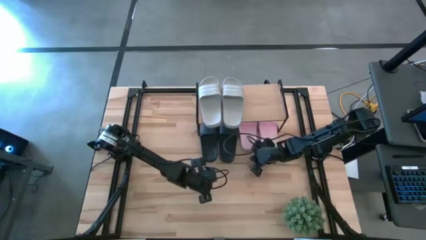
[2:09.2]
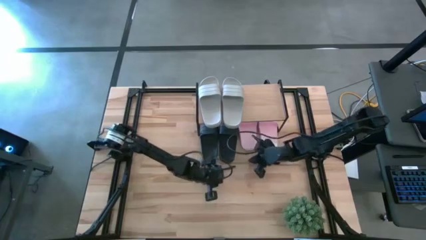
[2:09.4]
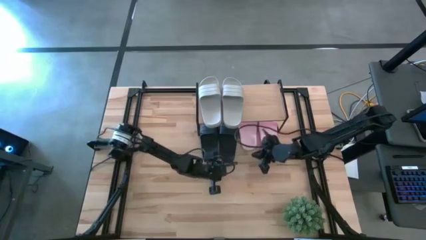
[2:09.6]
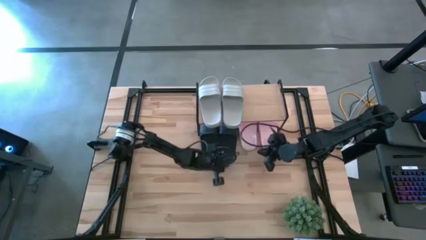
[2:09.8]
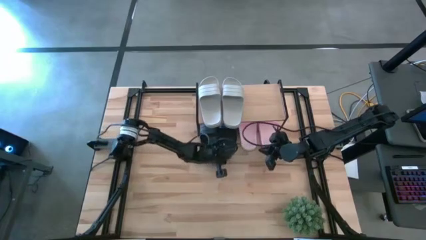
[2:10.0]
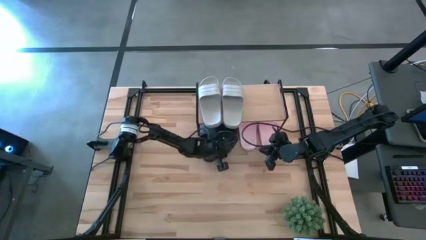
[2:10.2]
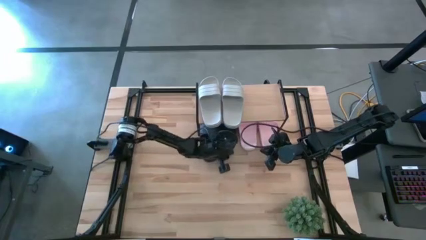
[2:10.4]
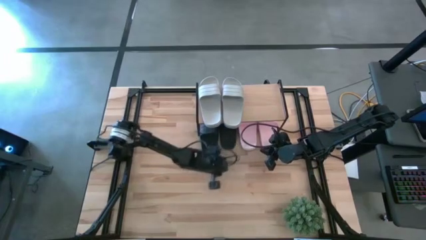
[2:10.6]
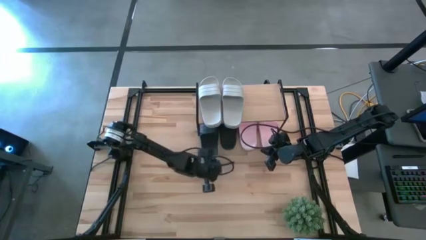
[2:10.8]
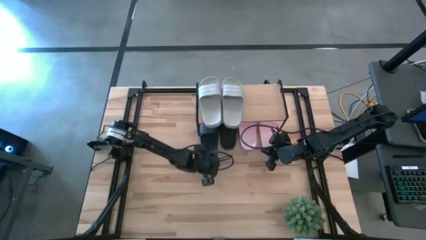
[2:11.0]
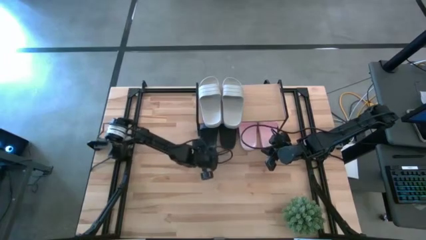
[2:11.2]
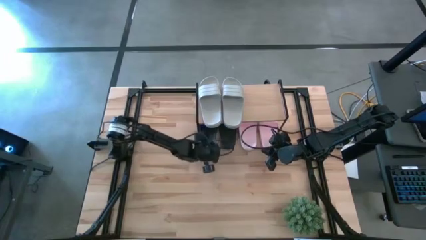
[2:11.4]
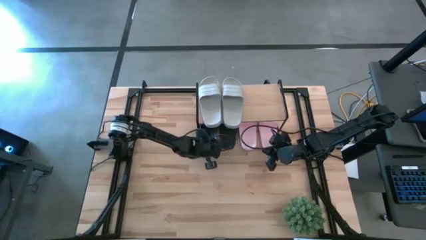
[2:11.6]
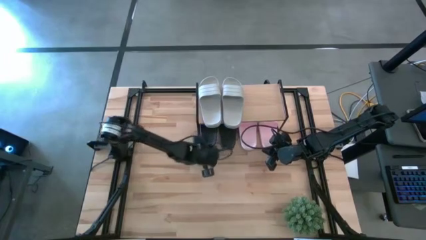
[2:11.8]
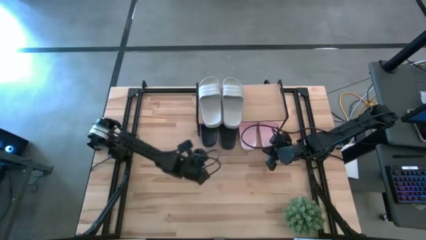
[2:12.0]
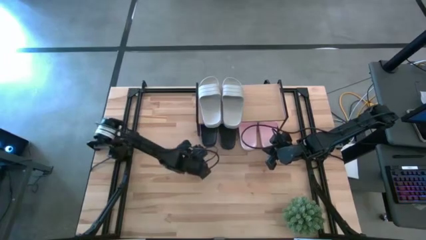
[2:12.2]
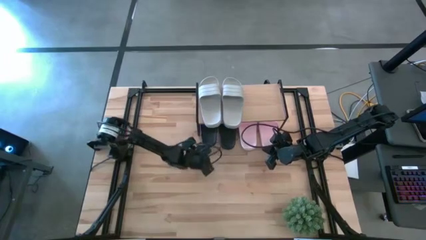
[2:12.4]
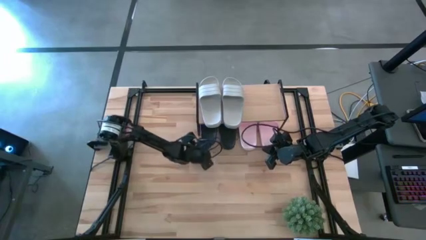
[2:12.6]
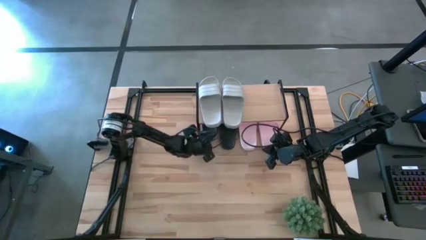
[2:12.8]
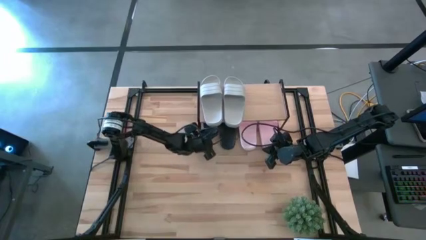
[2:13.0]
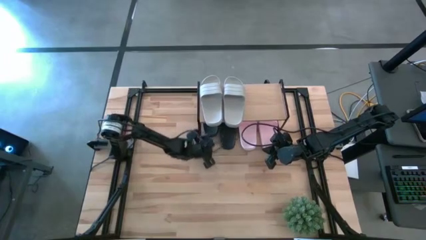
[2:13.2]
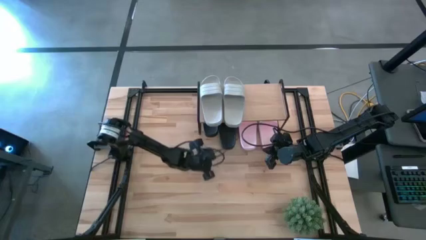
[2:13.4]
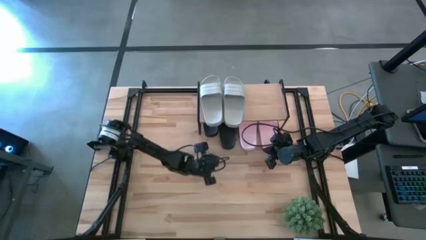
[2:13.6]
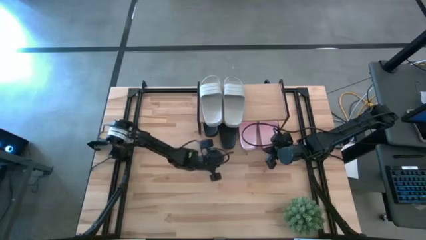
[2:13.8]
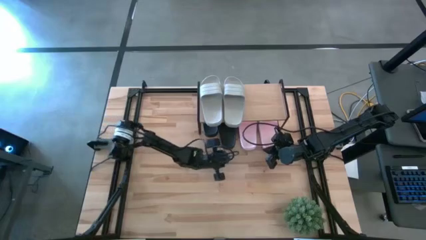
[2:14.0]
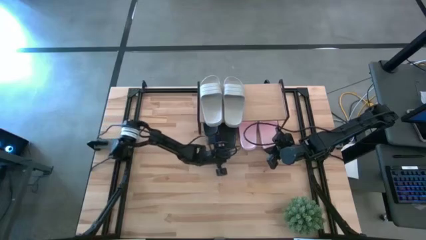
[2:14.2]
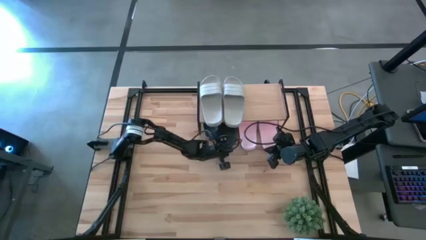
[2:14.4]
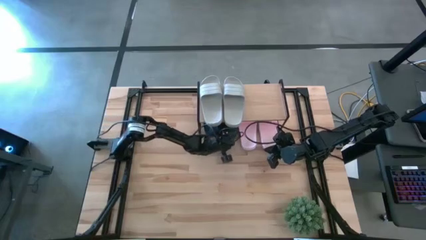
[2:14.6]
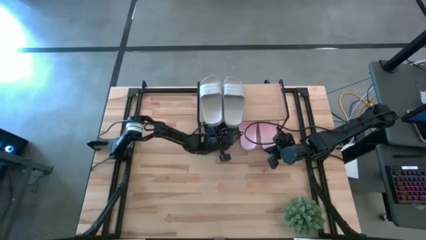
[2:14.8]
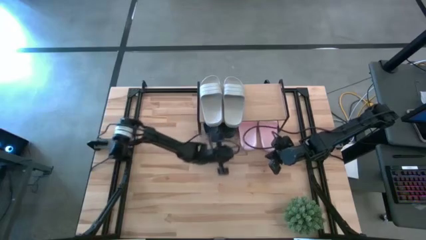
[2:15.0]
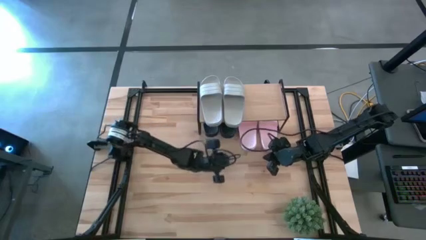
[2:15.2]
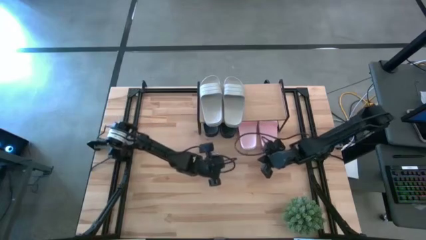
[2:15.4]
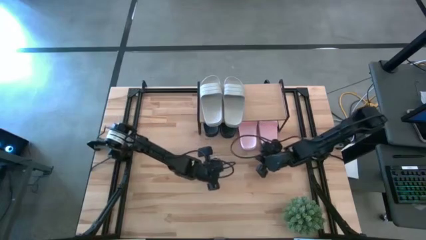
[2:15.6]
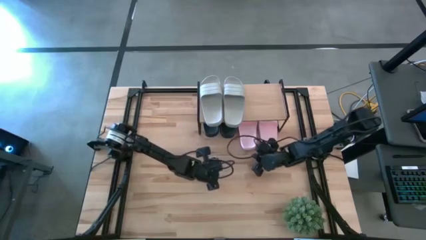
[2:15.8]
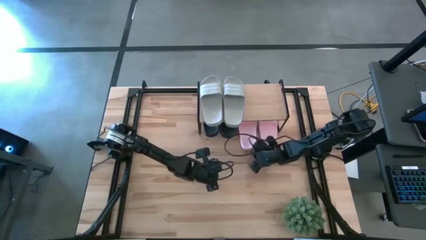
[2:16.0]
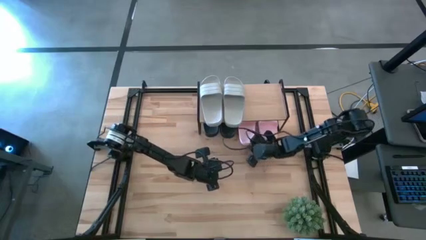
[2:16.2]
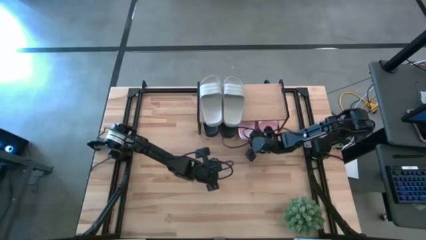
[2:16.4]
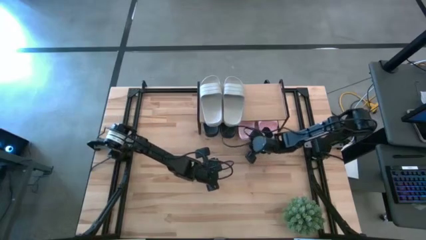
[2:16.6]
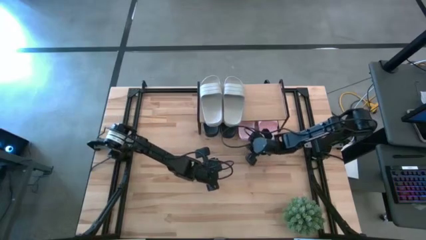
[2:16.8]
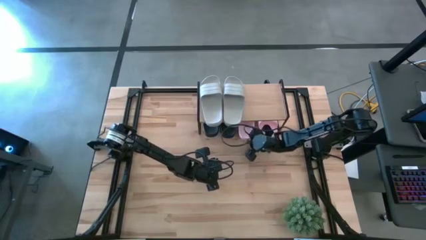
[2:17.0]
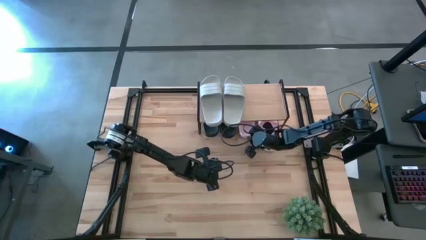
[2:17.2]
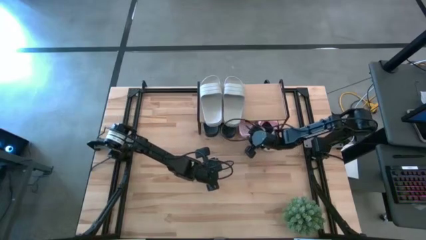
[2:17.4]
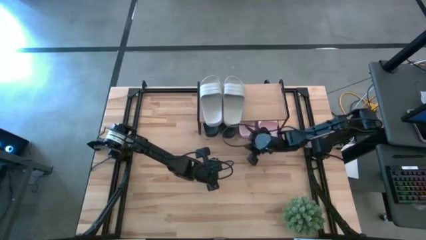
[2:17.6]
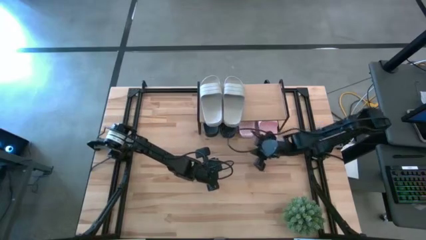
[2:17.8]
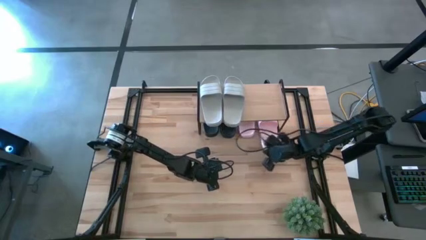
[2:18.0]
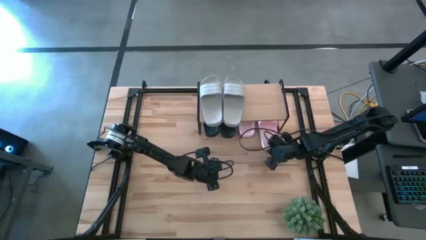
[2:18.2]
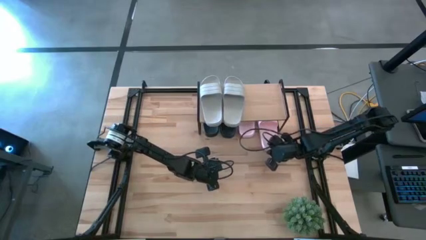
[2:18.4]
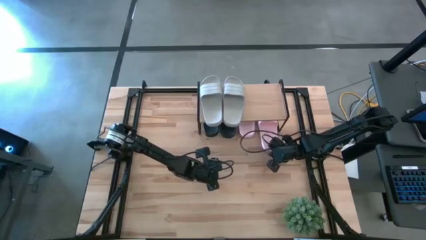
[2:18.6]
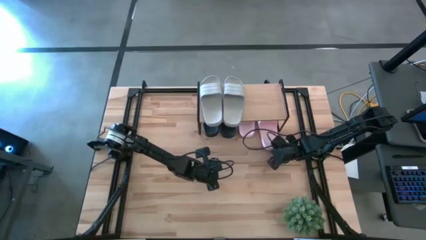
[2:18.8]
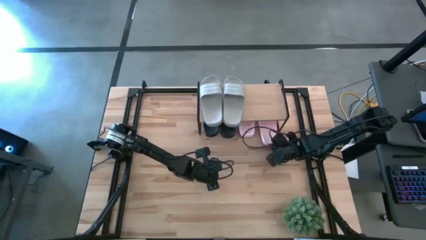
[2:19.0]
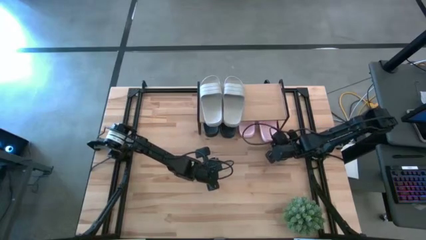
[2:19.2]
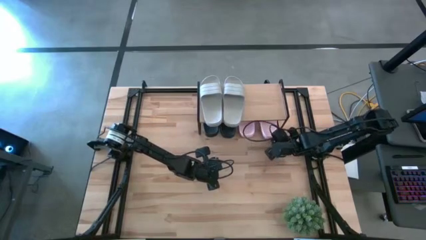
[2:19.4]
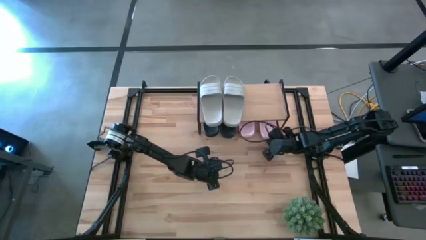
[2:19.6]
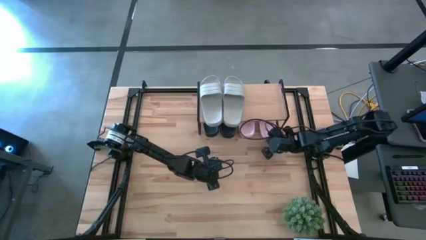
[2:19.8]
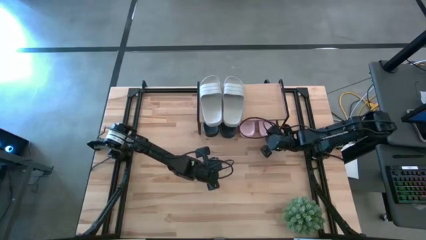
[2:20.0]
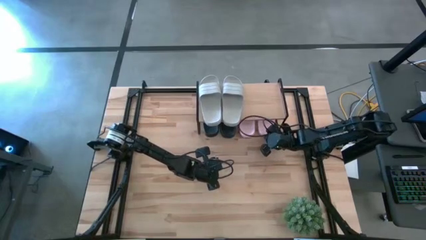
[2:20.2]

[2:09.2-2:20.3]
Task: Pick and place slides into the shelf
Move the black and pink slides under the shelf

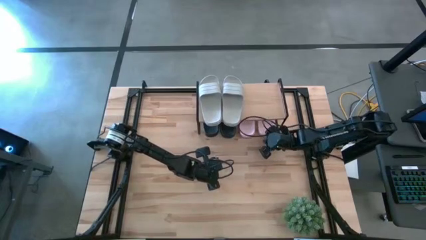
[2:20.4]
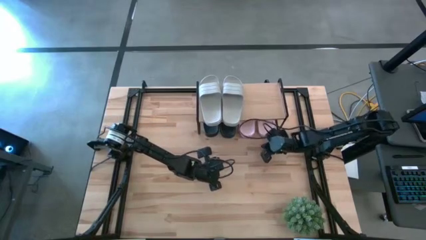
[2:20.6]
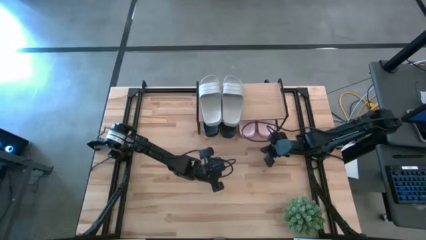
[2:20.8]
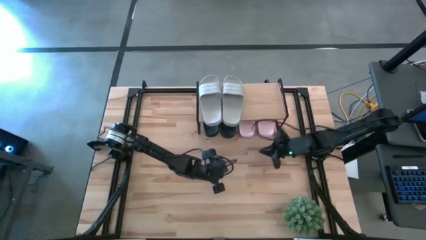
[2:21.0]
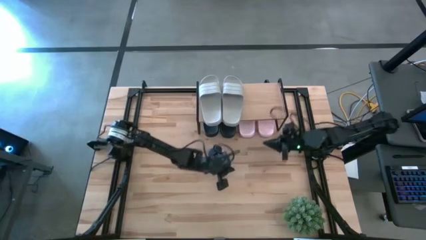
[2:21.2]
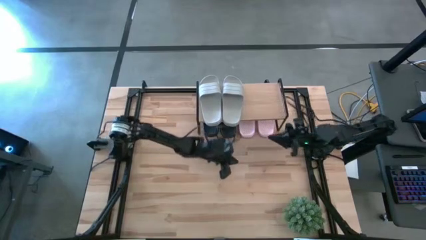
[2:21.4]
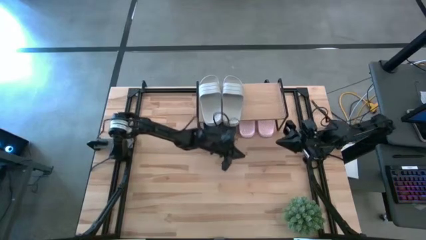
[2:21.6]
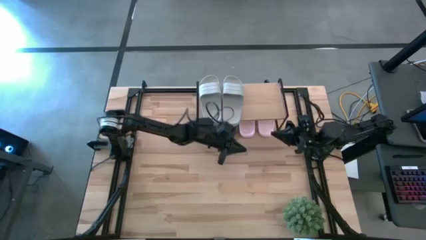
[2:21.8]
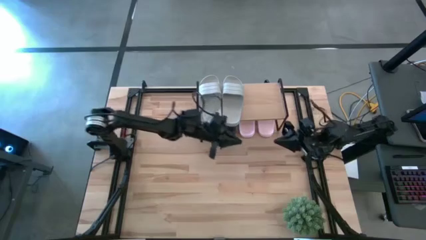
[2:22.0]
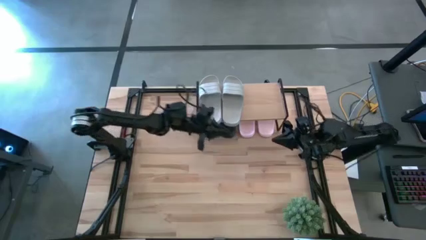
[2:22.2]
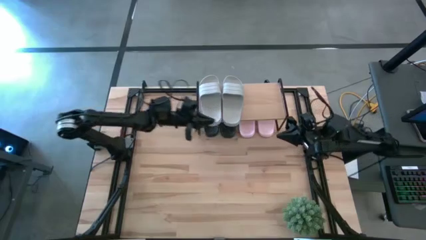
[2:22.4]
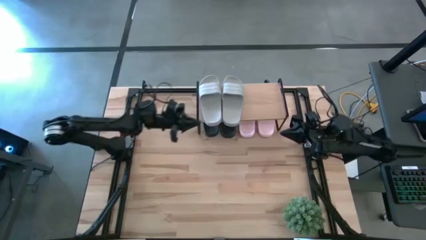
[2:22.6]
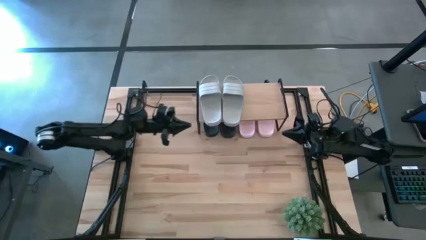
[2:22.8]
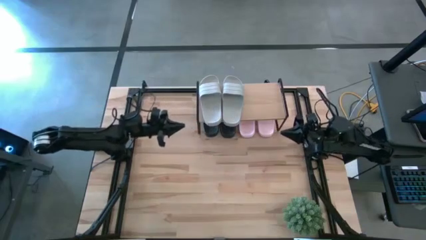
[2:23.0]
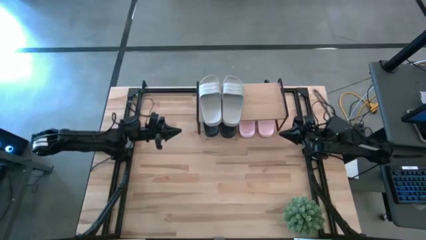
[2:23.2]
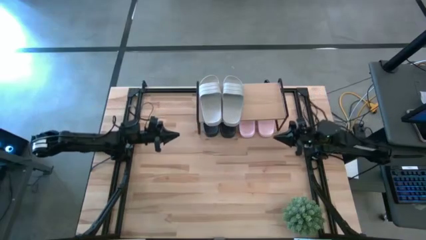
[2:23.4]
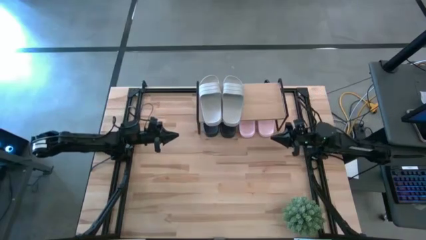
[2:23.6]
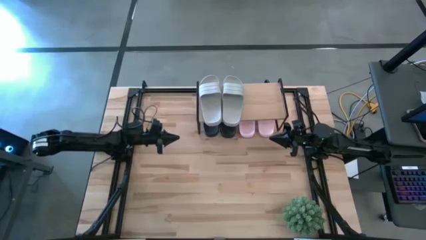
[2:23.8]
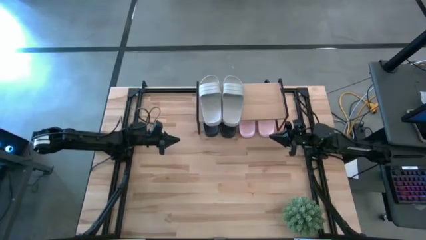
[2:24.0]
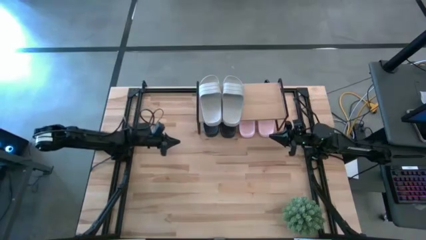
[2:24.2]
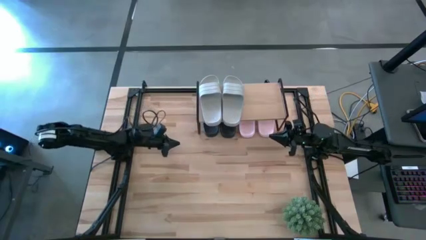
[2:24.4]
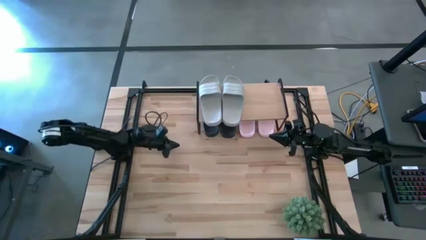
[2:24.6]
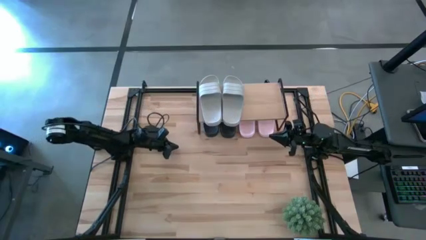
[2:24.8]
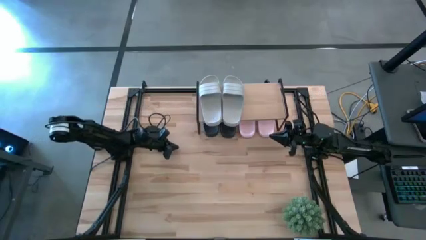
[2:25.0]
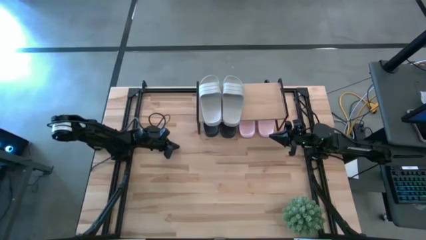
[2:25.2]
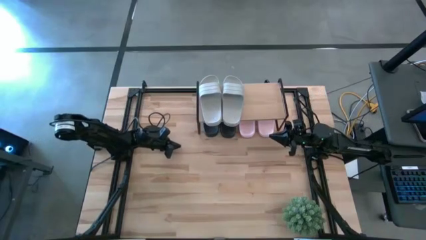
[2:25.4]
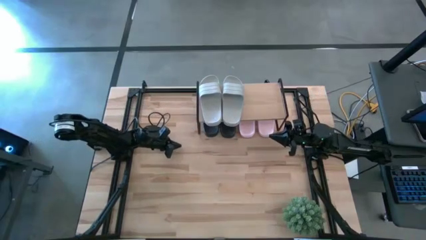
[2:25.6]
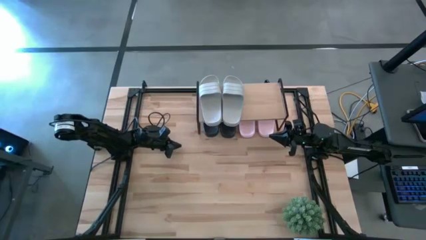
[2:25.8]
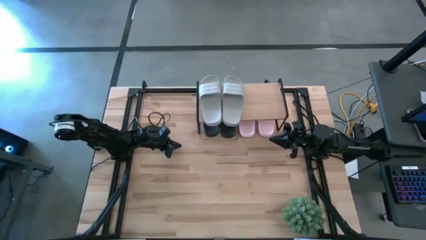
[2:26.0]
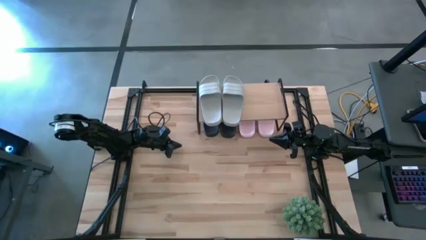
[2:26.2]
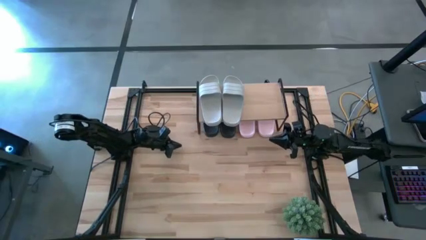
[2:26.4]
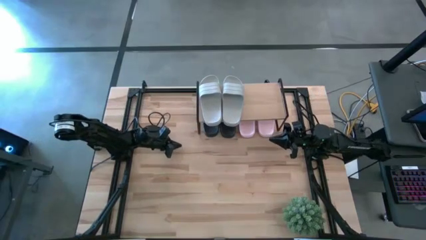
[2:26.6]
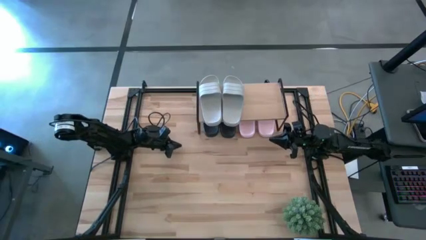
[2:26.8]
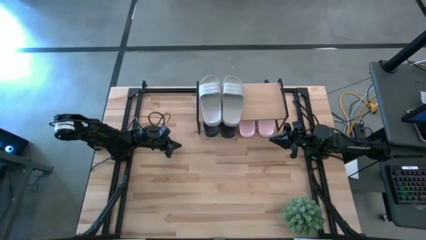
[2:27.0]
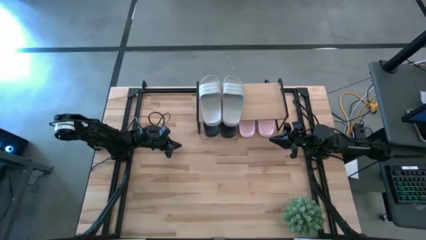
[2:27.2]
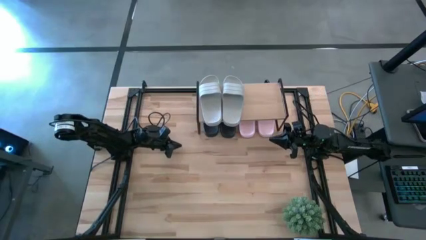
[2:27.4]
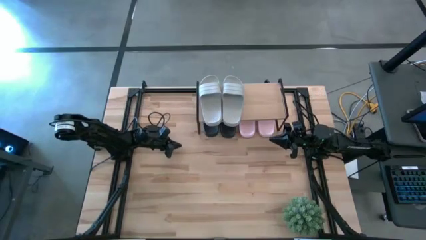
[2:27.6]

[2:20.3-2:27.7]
Return to Home Position
